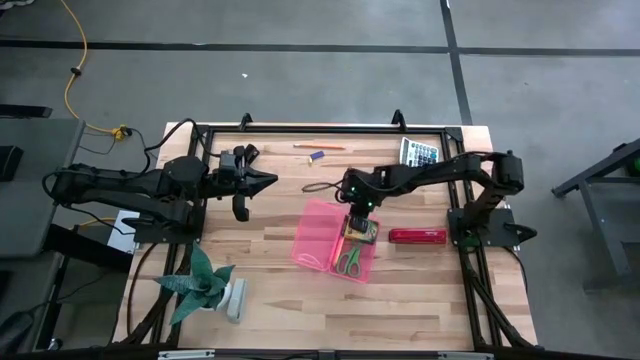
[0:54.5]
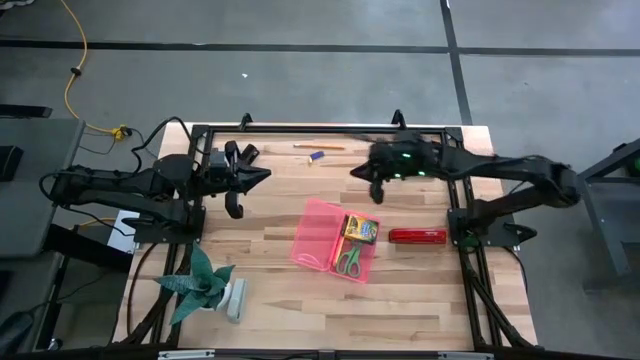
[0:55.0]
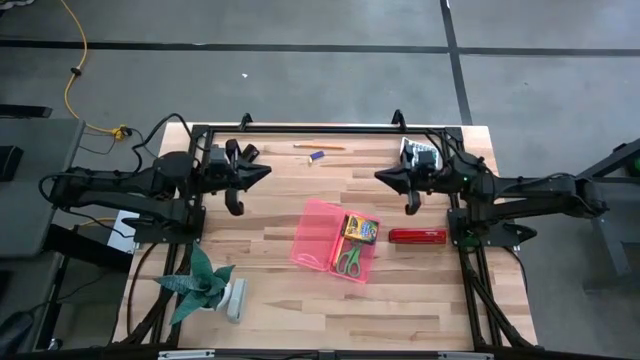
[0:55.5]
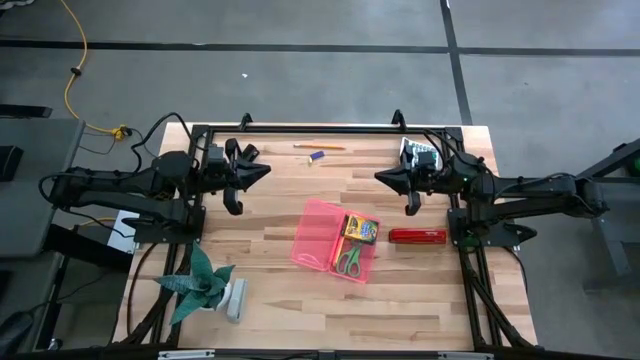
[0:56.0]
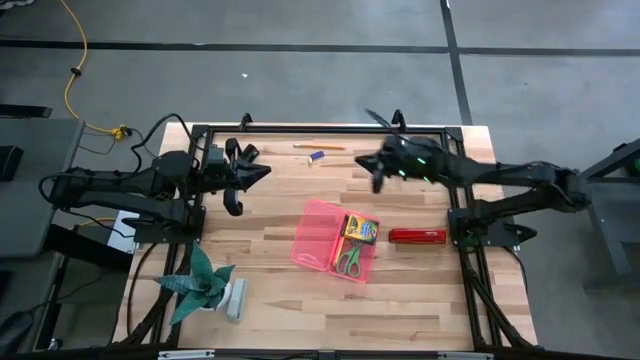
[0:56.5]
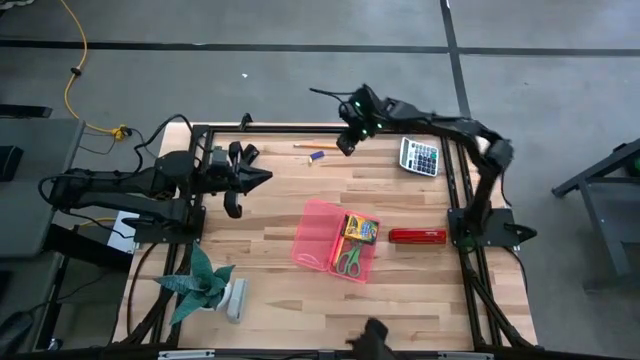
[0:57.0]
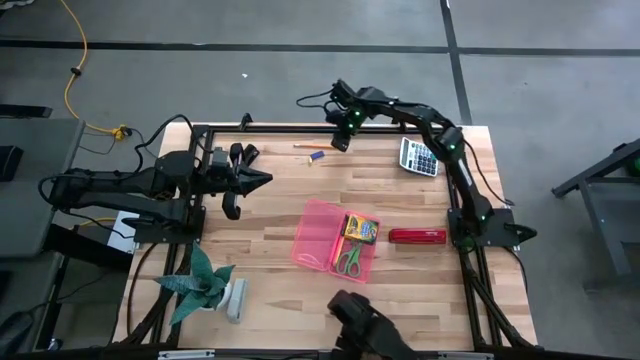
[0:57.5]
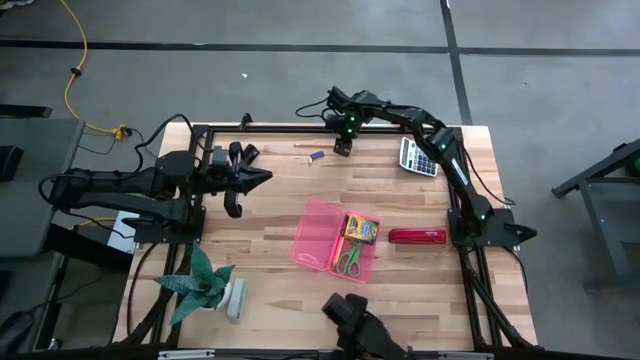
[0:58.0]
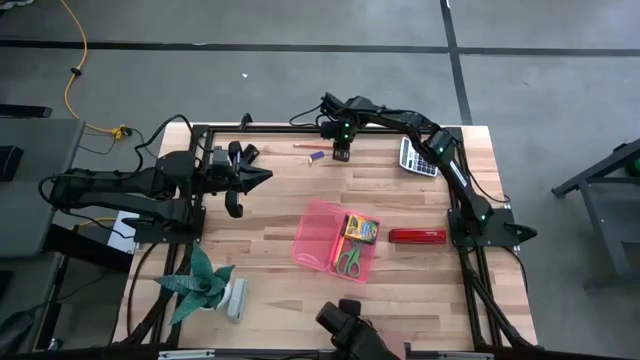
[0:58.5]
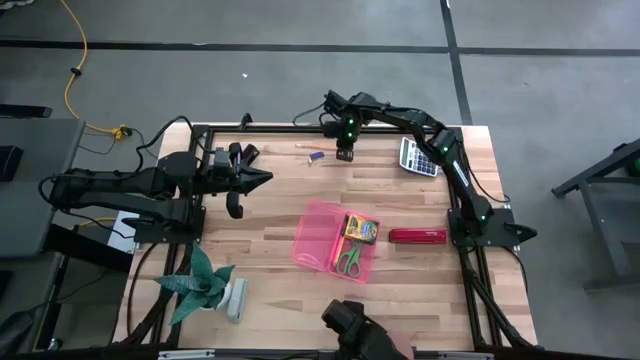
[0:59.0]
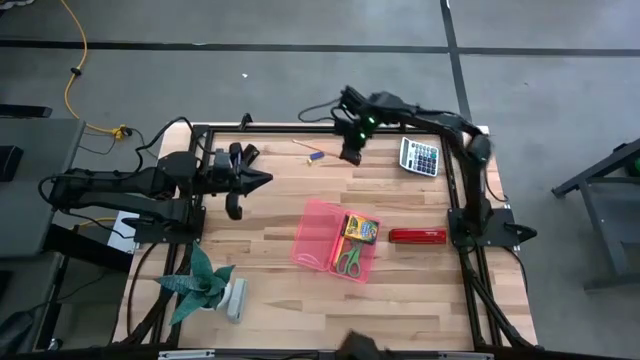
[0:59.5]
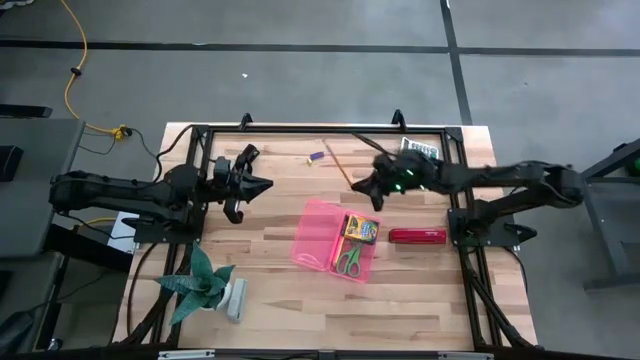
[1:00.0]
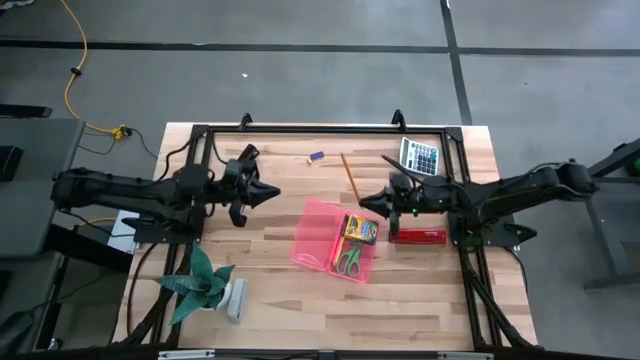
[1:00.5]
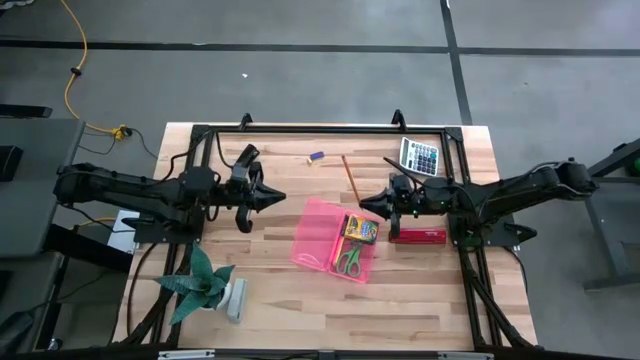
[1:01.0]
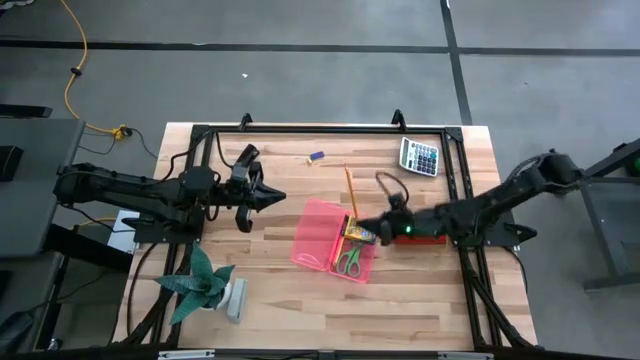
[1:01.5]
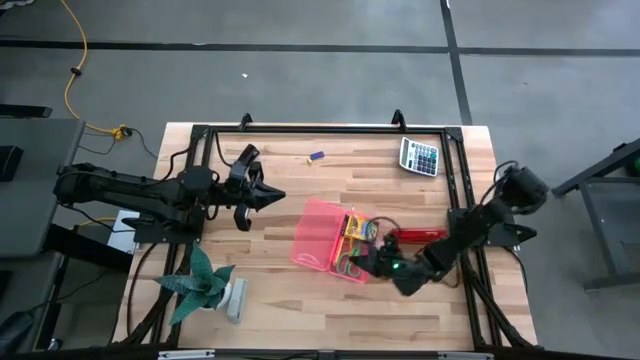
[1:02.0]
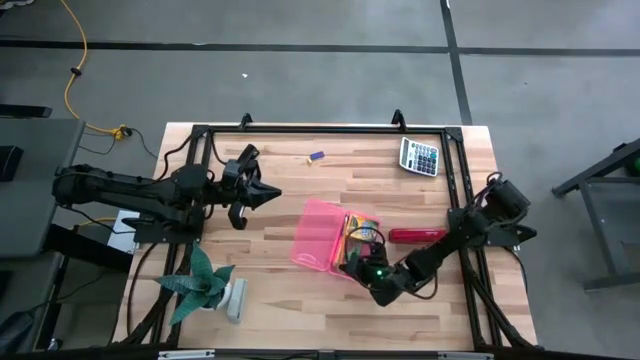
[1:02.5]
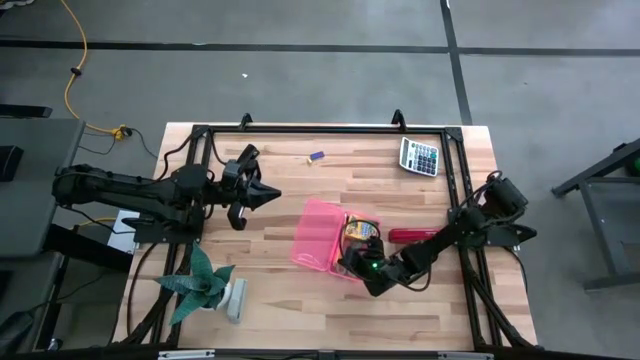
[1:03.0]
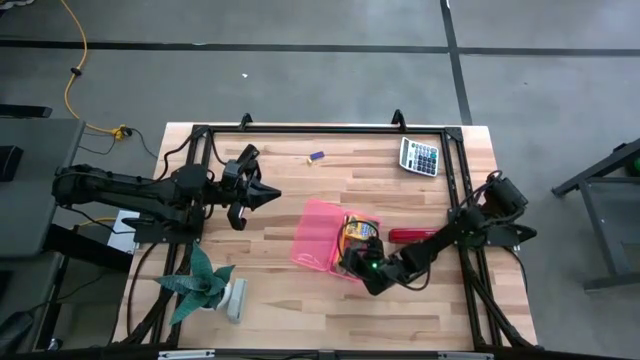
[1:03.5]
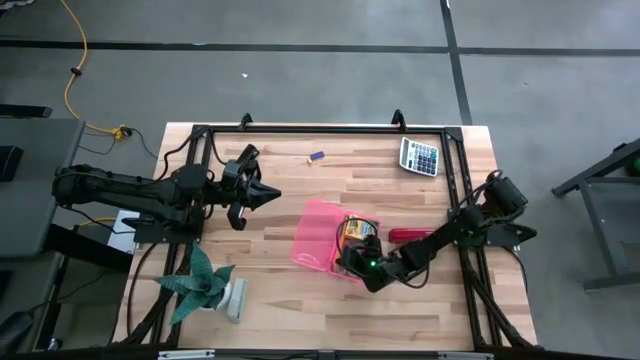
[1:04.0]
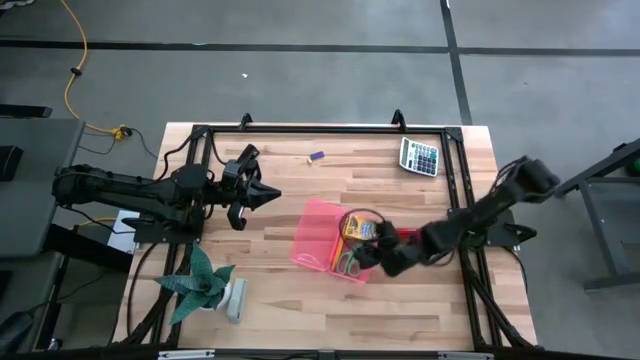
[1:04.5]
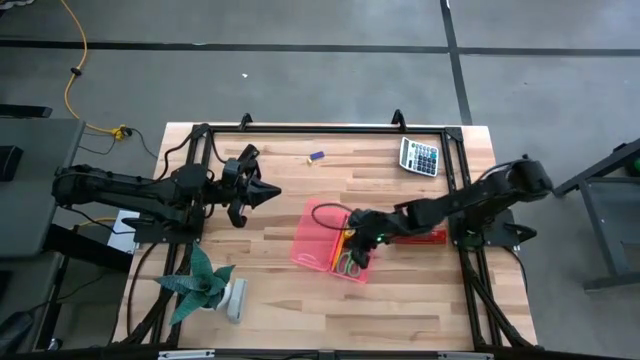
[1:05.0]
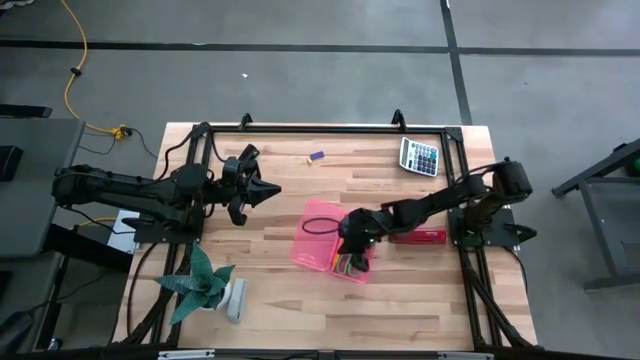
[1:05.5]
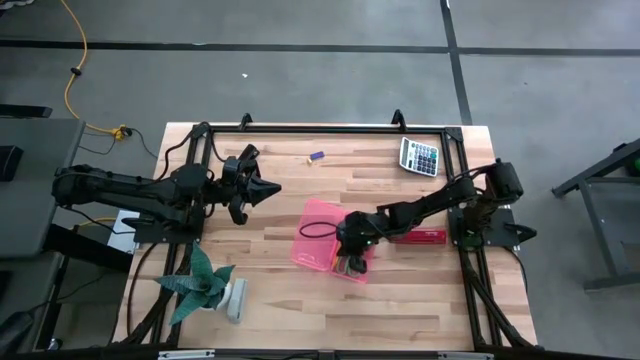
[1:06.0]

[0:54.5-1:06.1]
Task: Pack school essentials
Put the orange pencil into the pink supply box

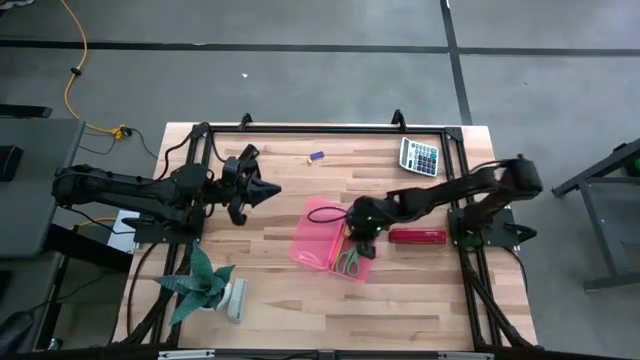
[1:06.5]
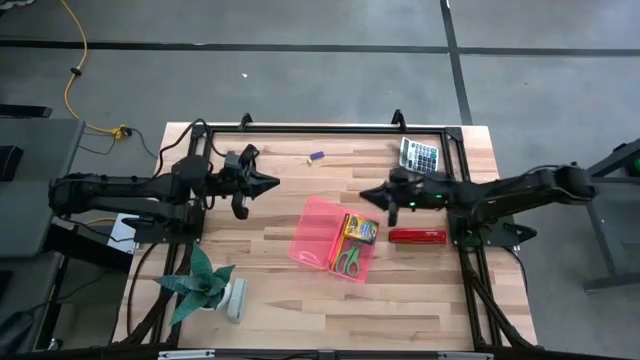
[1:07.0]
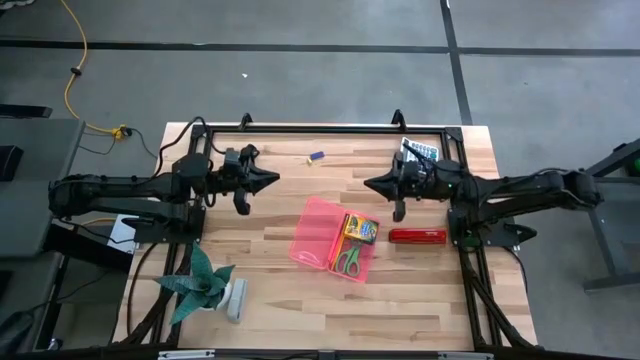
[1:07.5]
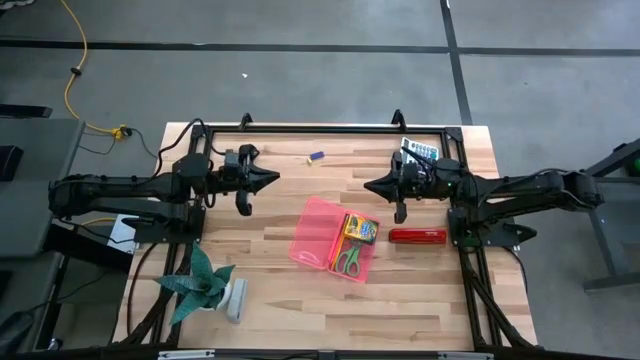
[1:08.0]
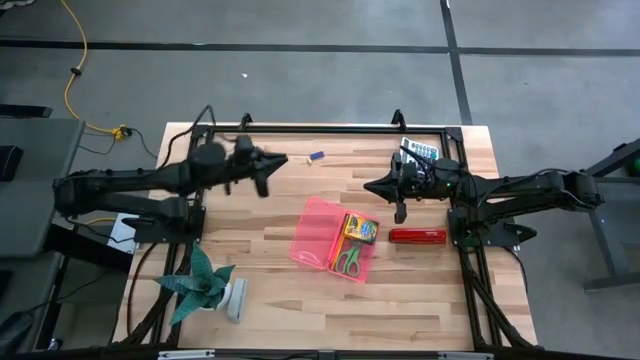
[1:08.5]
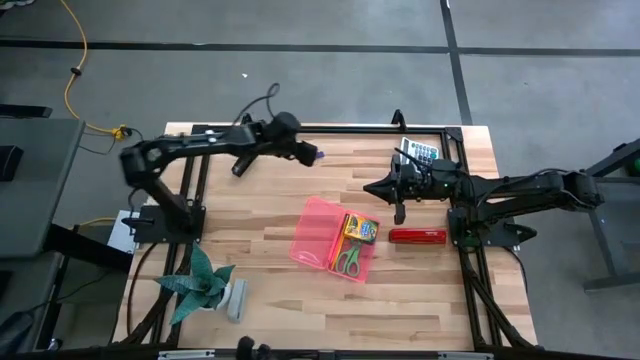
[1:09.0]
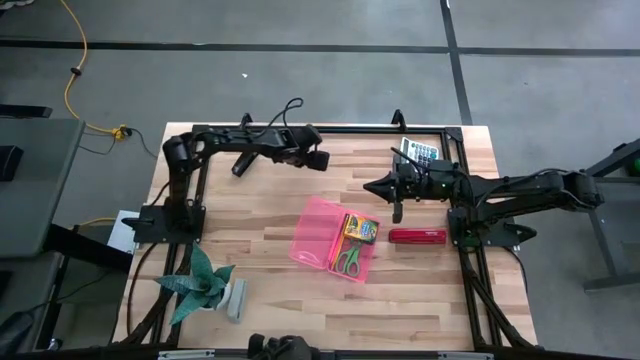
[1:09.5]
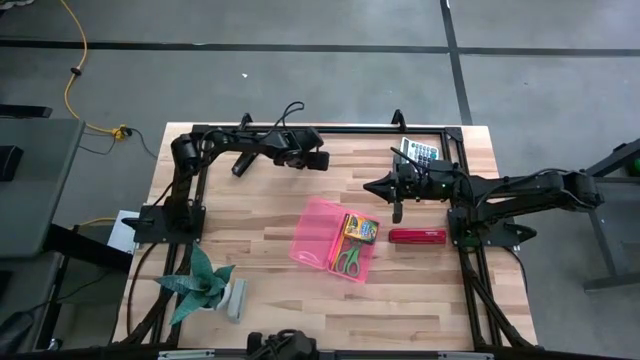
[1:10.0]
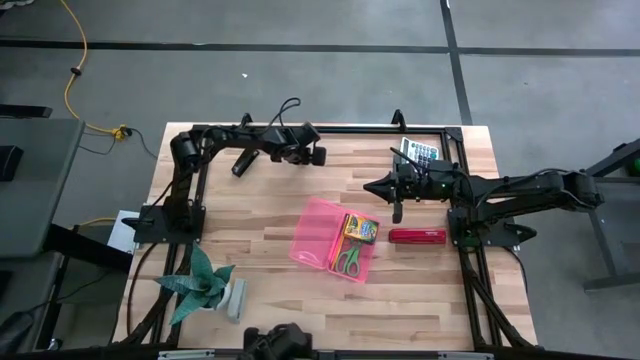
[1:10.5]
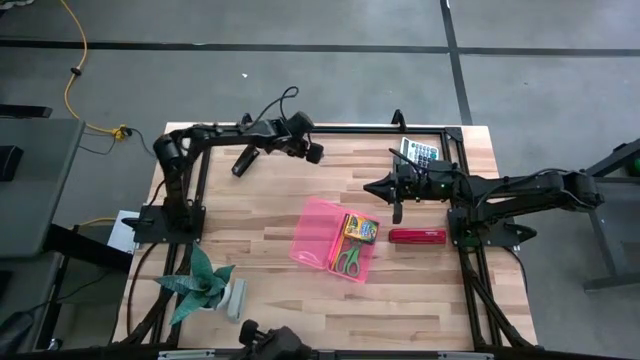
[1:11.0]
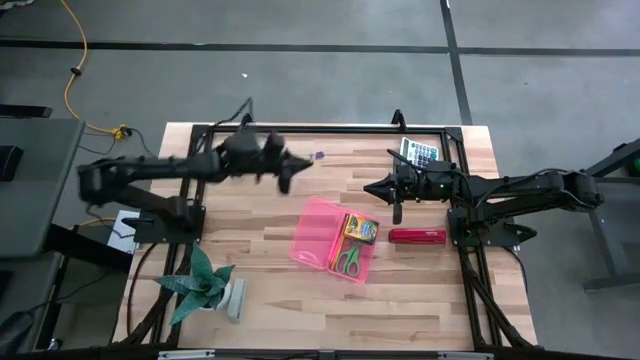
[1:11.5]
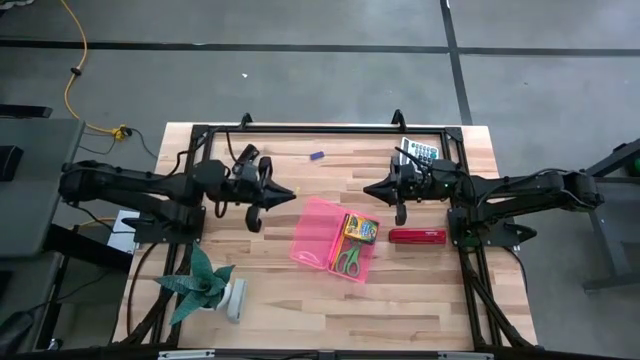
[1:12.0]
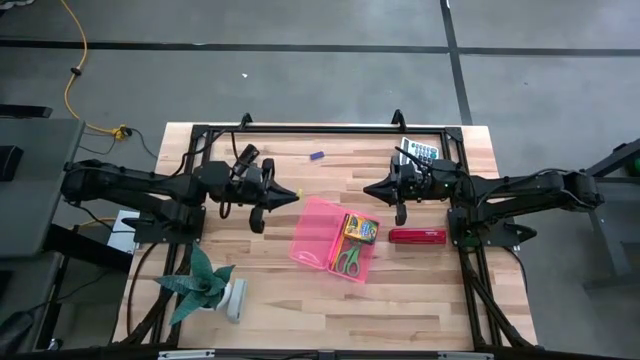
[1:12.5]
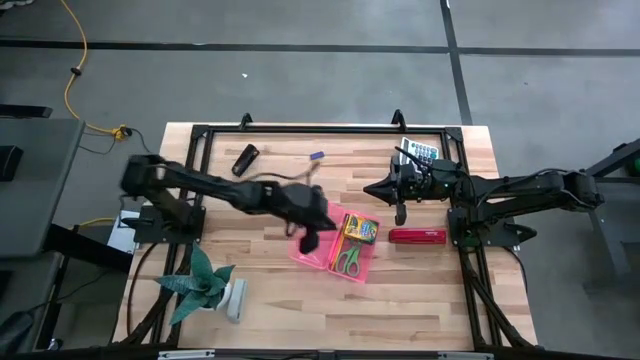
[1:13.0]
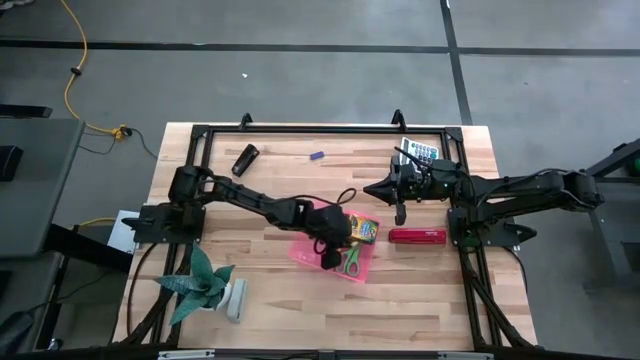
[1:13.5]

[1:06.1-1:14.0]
Put the yellow eraser into the pink supply box

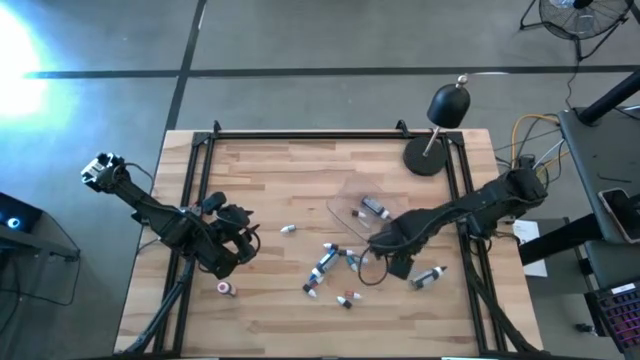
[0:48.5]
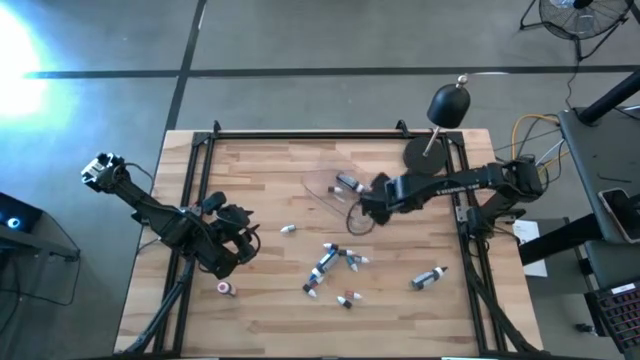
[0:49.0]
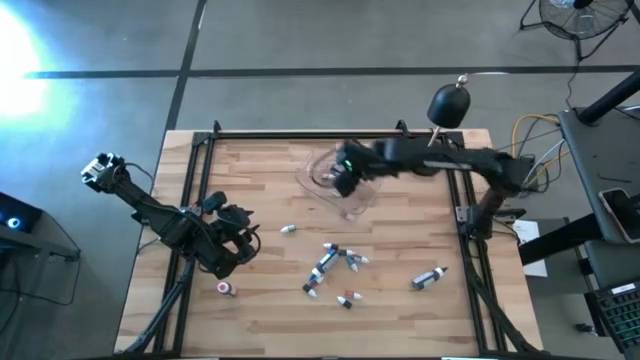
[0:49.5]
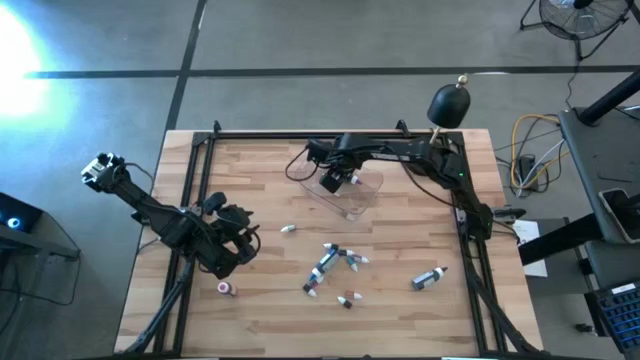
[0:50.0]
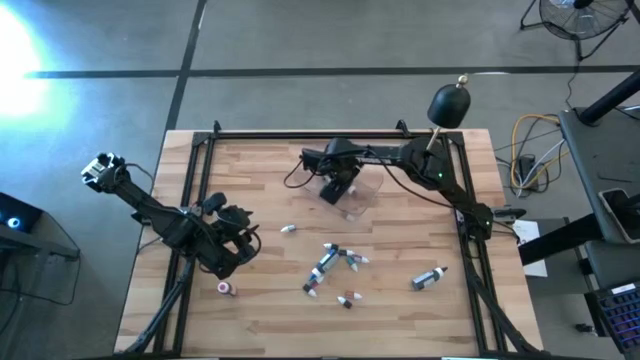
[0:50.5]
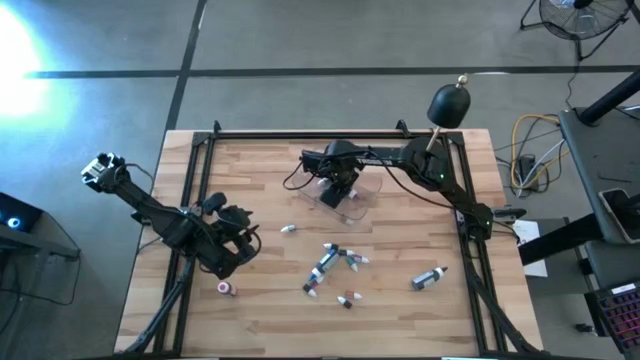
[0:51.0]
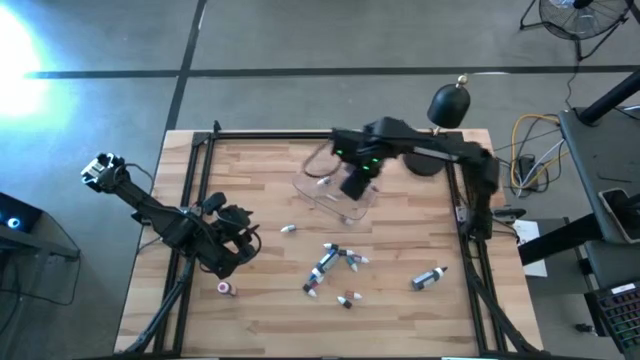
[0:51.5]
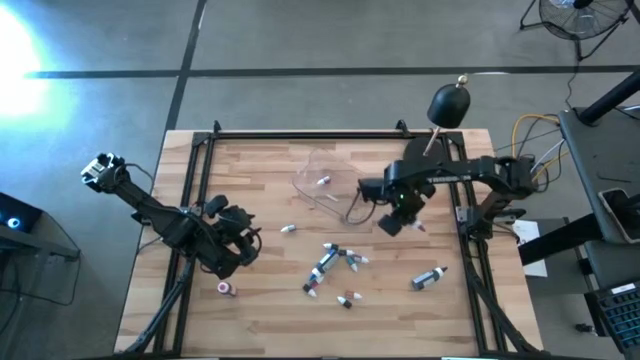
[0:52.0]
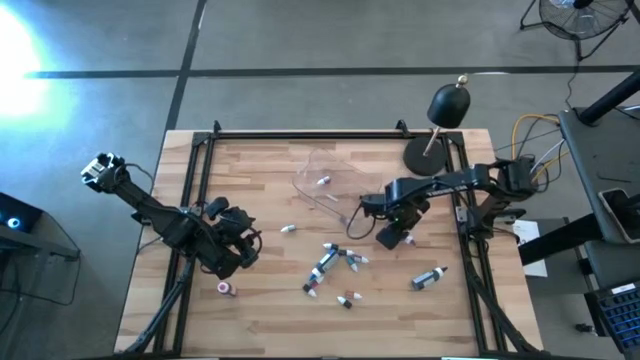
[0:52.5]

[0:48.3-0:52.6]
Task: Pick & Place food coloring
Remove the large purple food coloring bottle from the transparent bin
